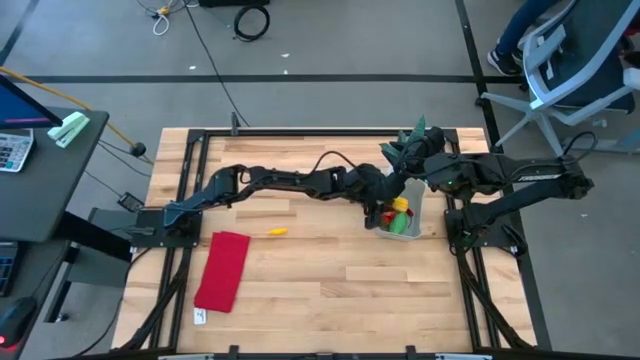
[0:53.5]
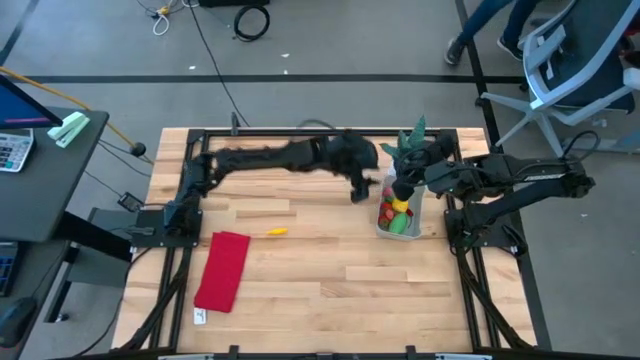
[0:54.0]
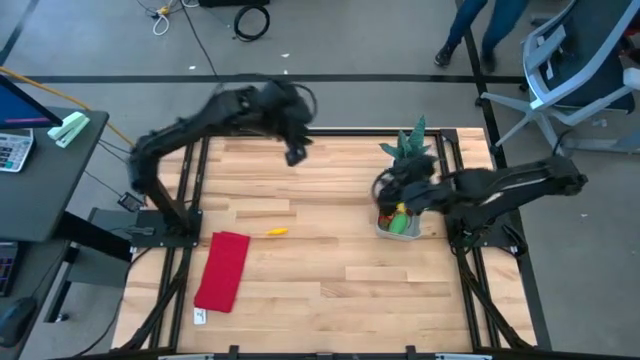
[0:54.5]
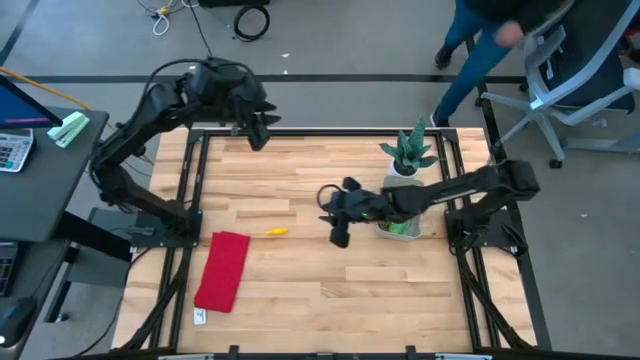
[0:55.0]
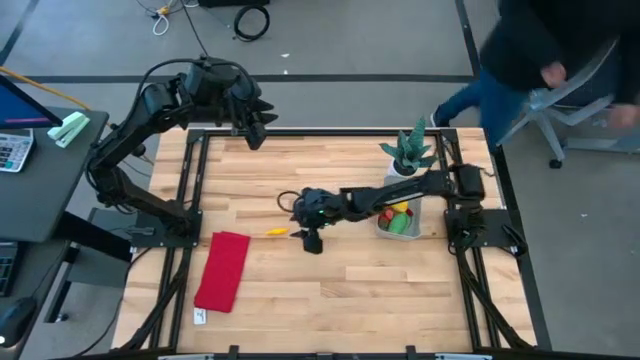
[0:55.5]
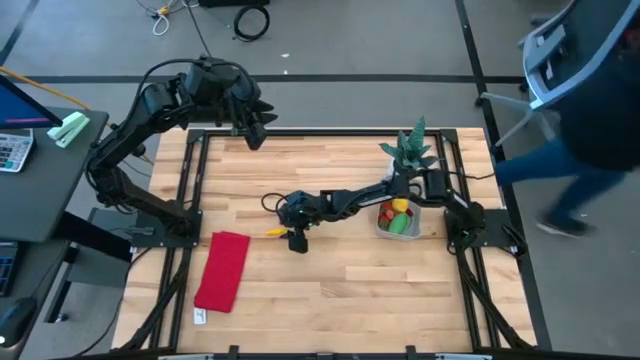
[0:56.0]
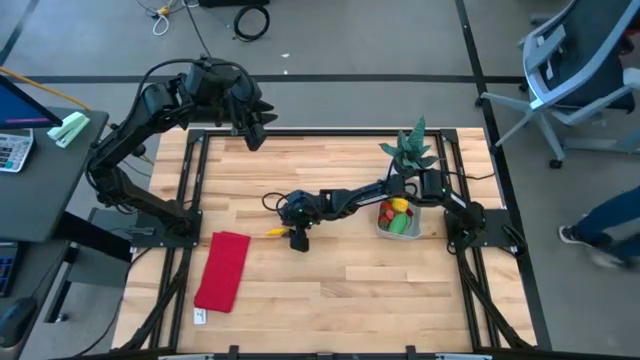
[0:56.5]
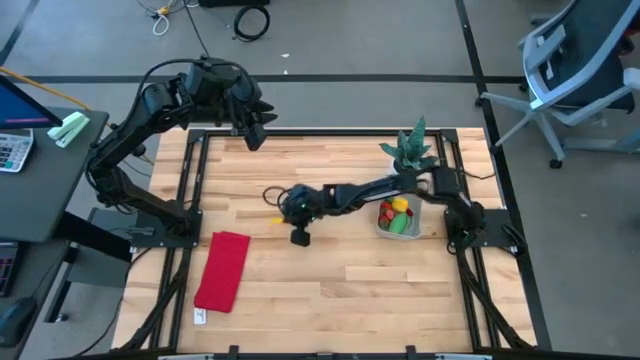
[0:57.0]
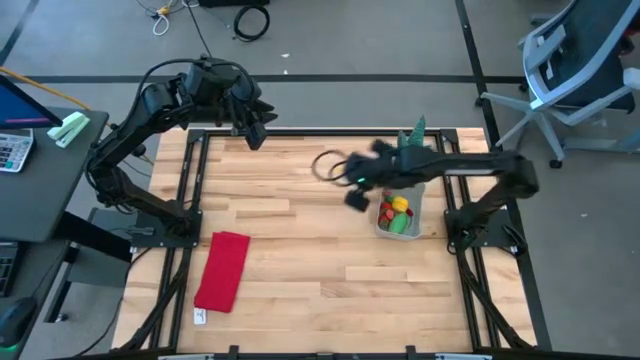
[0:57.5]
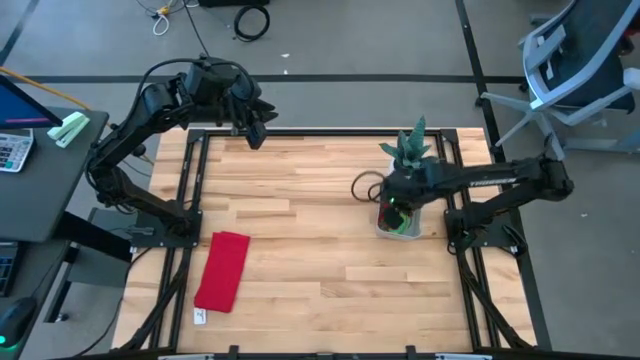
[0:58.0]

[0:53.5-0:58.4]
Task: Pick and placing Produce into tupperware
Put the corn into the bin

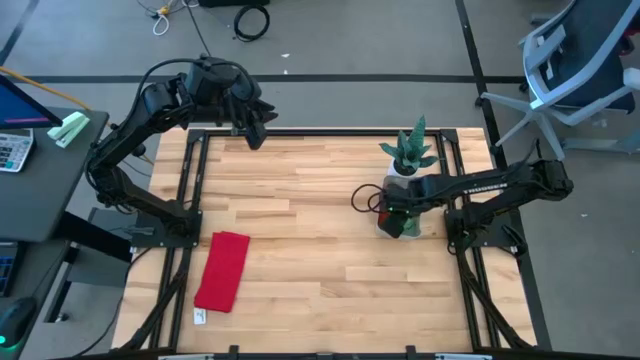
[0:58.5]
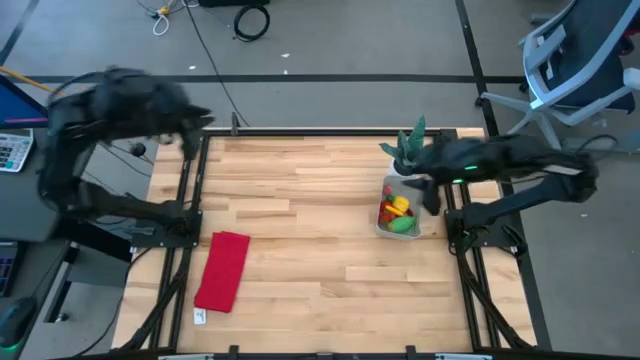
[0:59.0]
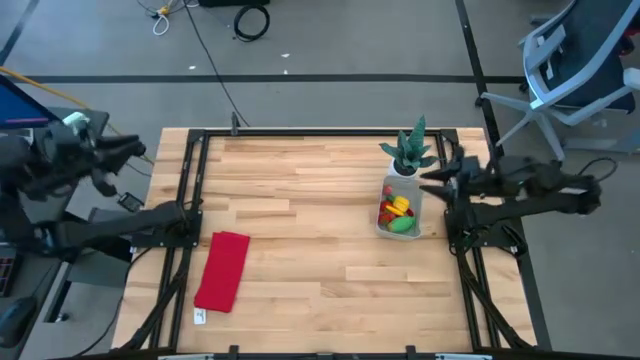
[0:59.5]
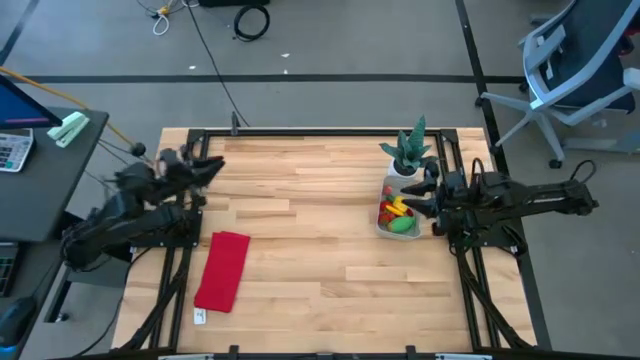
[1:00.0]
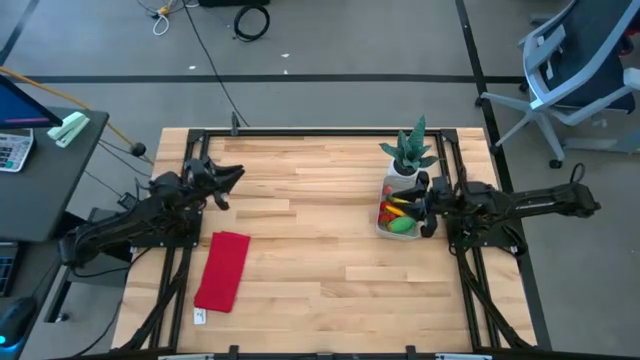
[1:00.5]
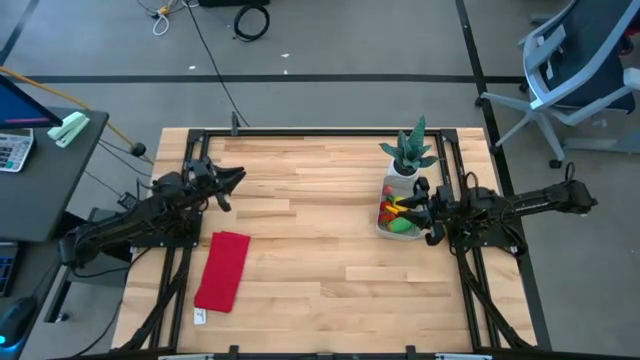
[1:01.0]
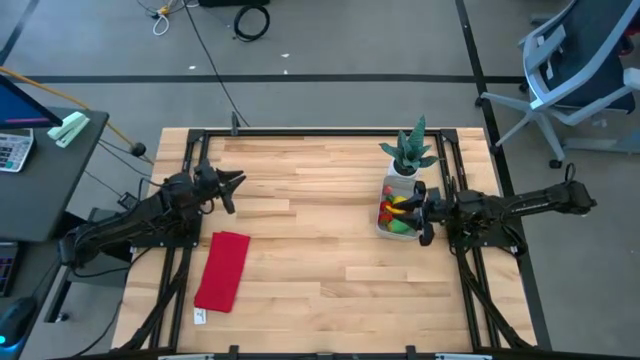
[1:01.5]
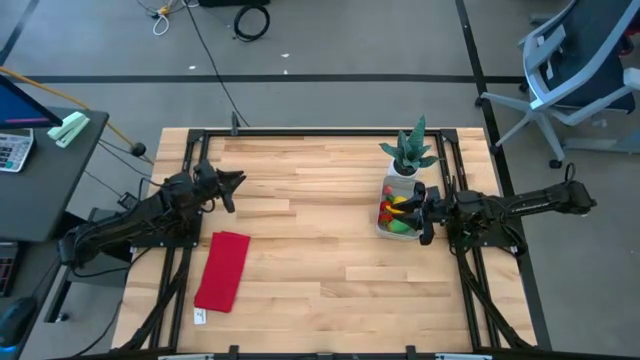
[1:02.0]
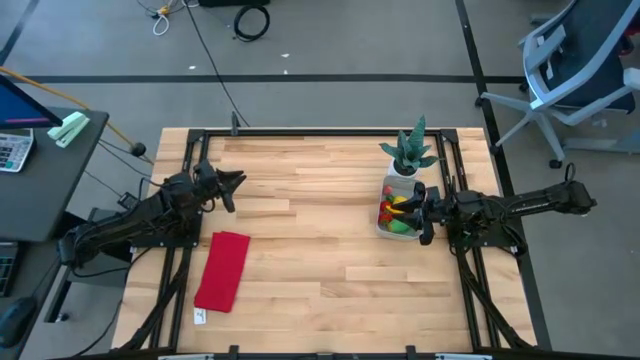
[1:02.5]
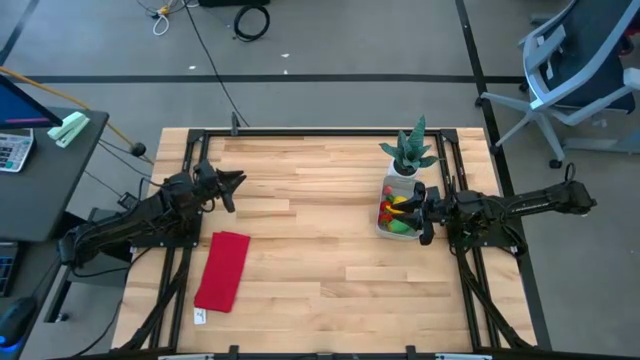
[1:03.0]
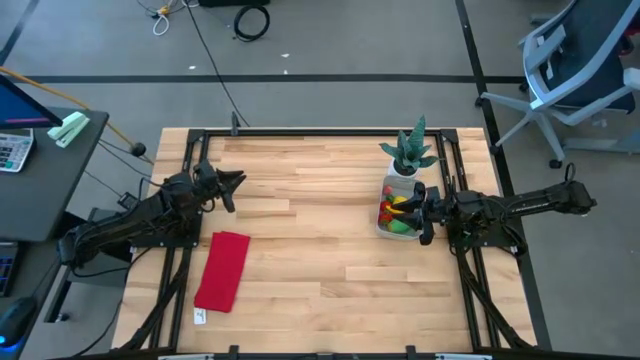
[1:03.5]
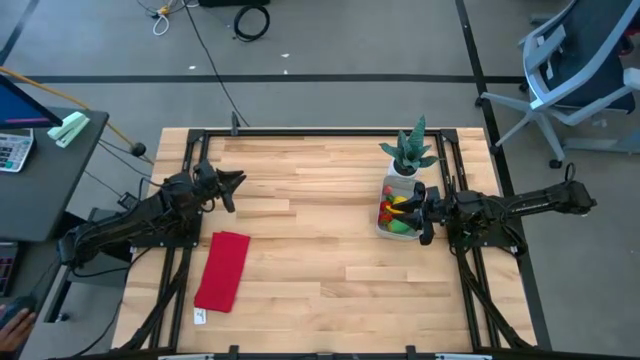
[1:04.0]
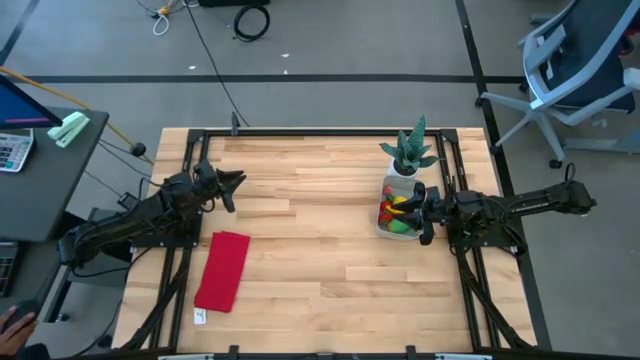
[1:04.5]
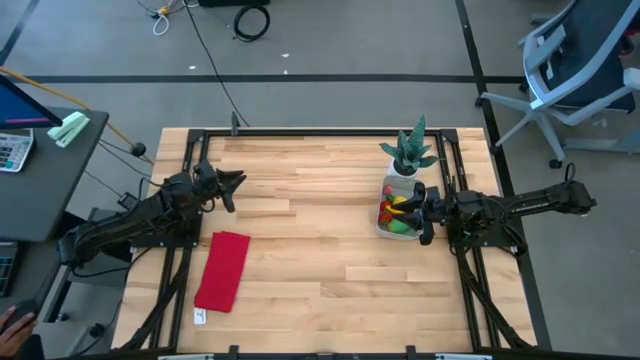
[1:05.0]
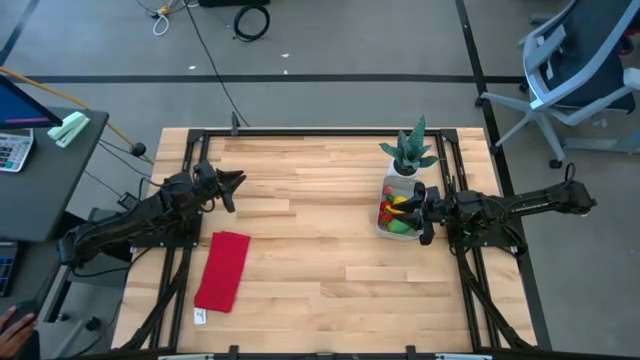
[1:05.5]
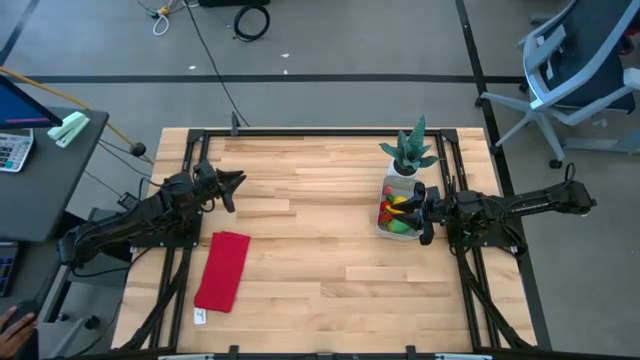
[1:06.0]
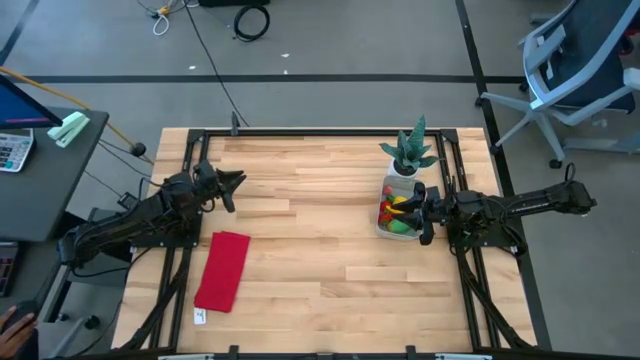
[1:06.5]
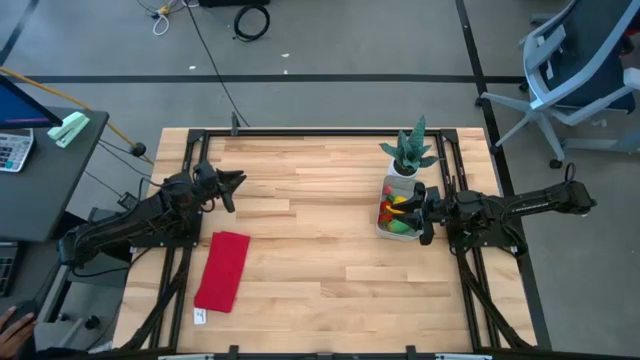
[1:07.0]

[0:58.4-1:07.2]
Return to Home Position

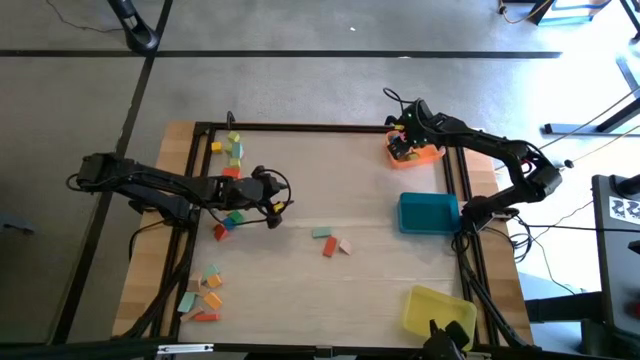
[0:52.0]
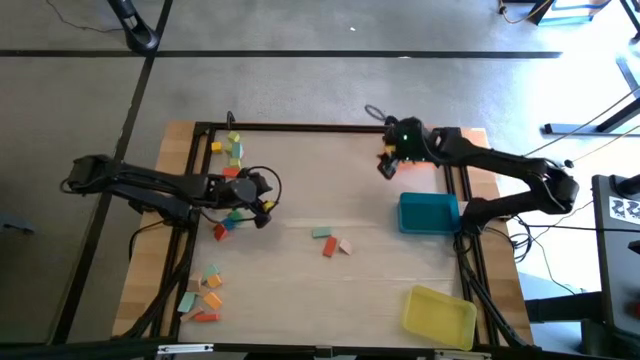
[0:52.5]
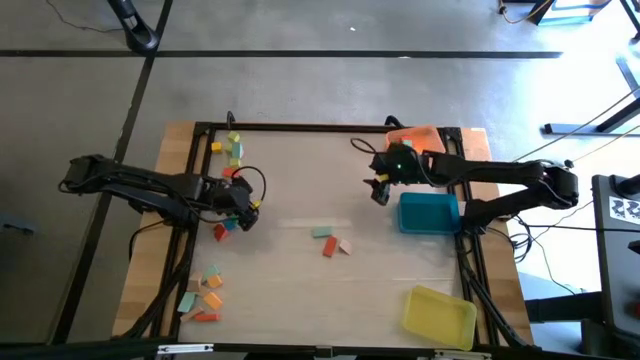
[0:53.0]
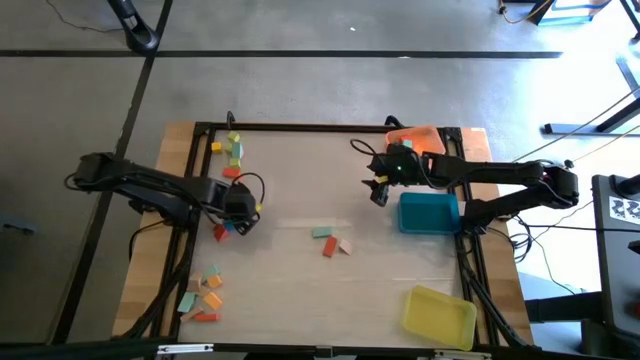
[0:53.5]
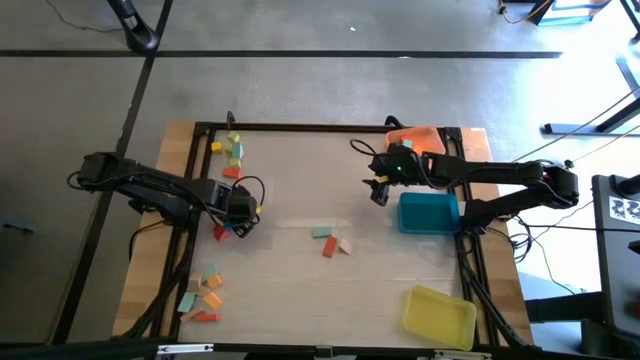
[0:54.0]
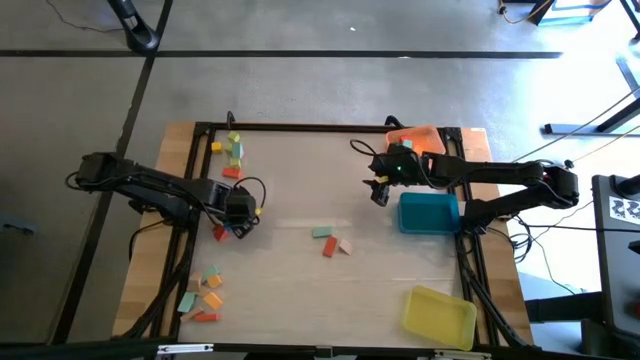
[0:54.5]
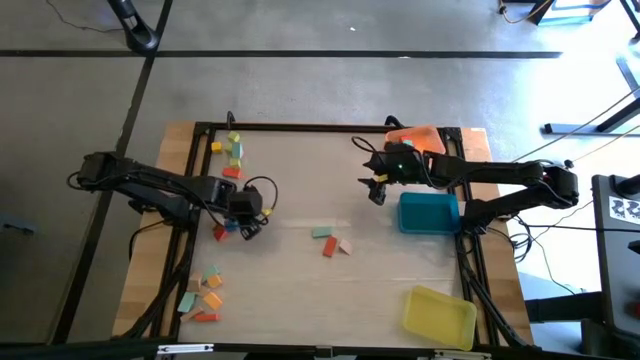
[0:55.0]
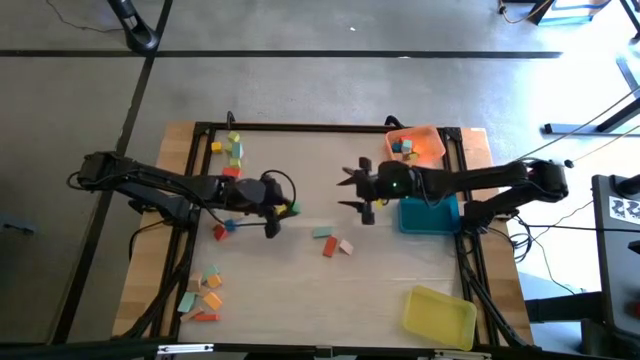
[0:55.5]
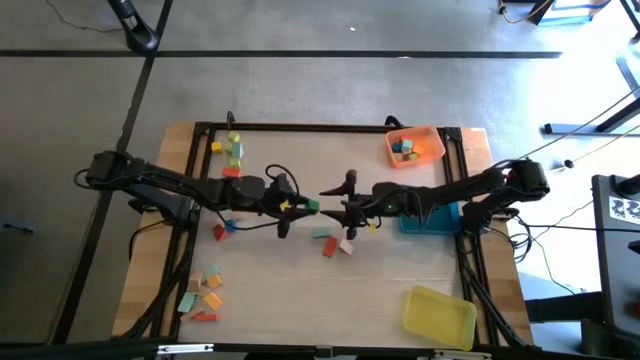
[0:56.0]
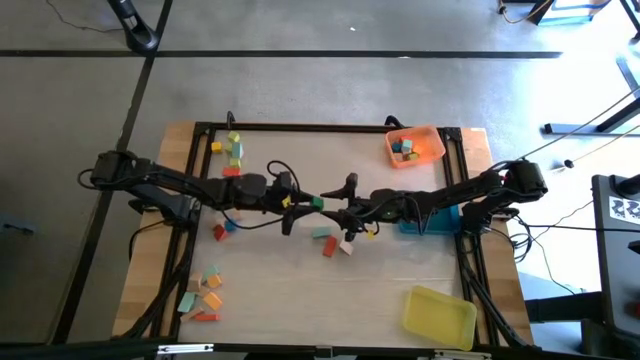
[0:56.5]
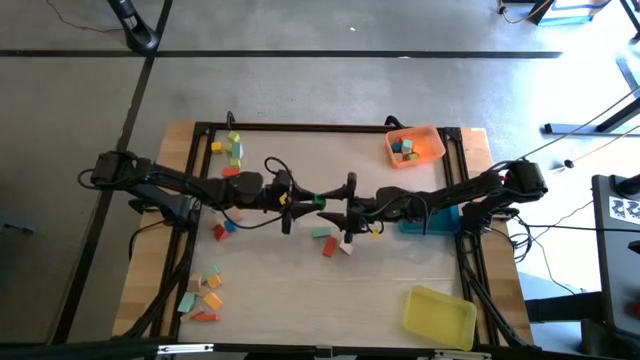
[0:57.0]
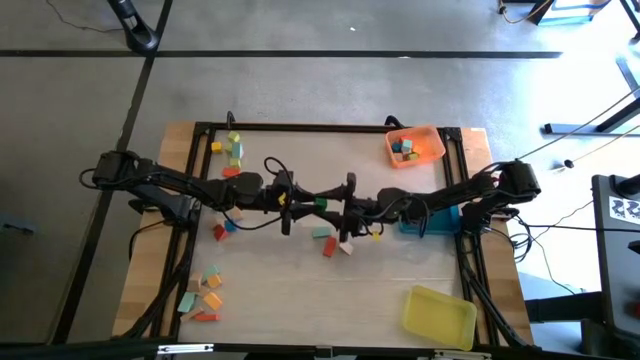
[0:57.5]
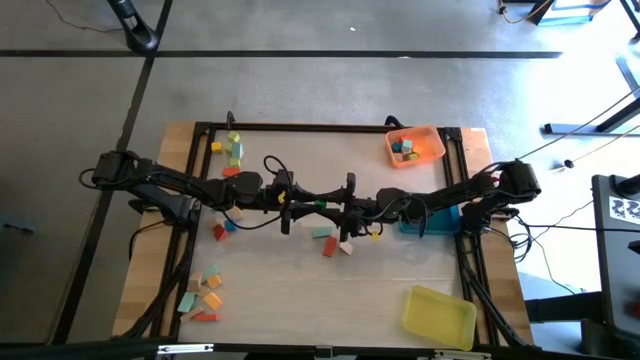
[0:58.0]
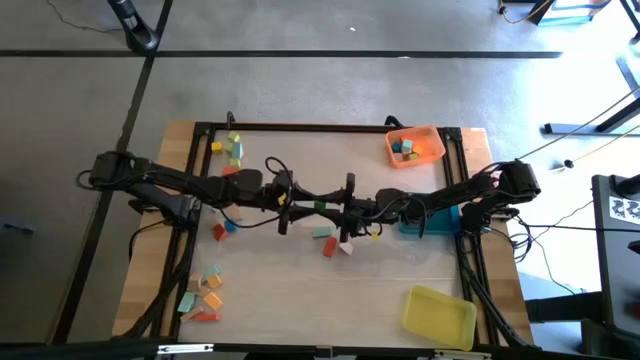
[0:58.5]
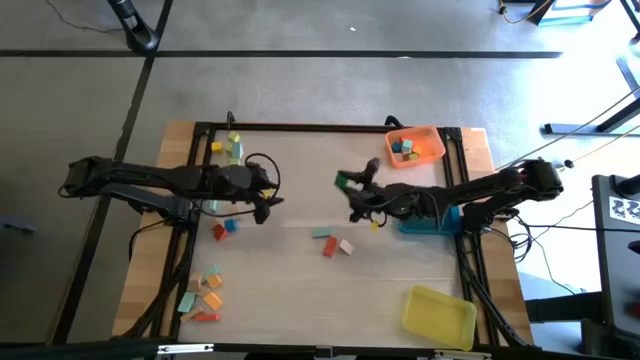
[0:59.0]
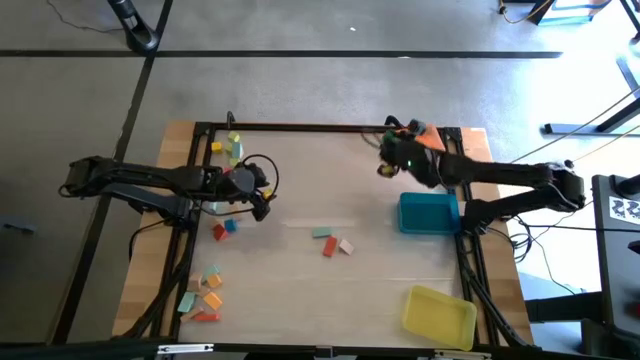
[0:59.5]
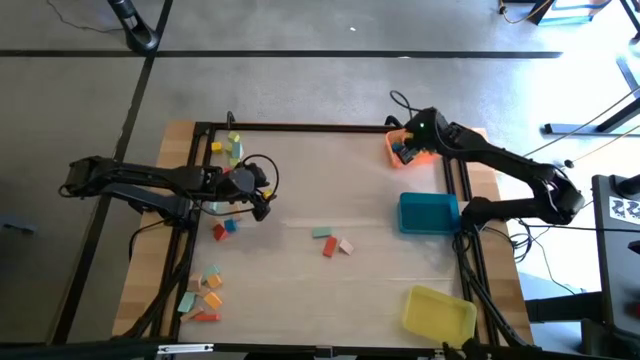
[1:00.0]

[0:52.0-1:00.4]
Task: Sort blocks by size
Put the green cube block into the orange bin
